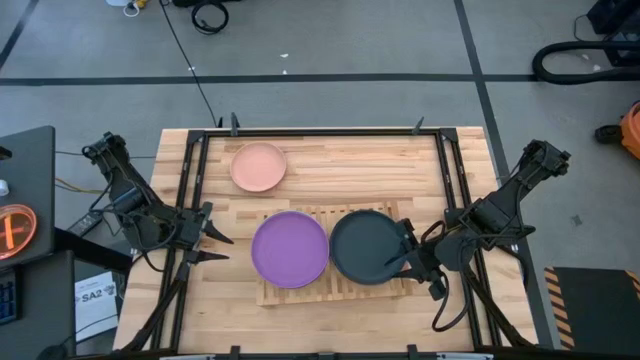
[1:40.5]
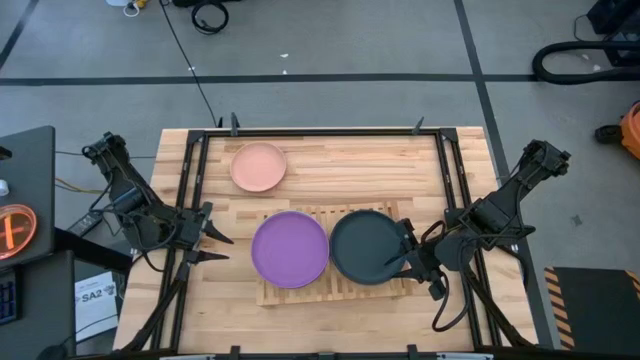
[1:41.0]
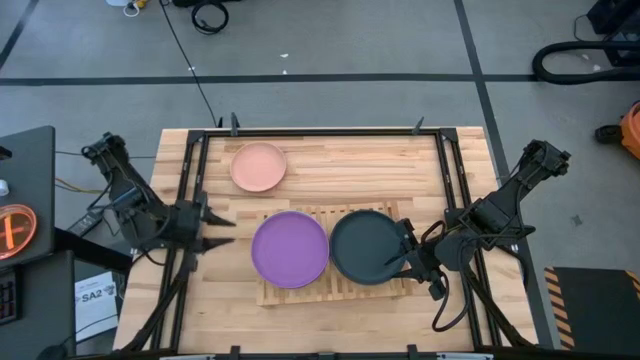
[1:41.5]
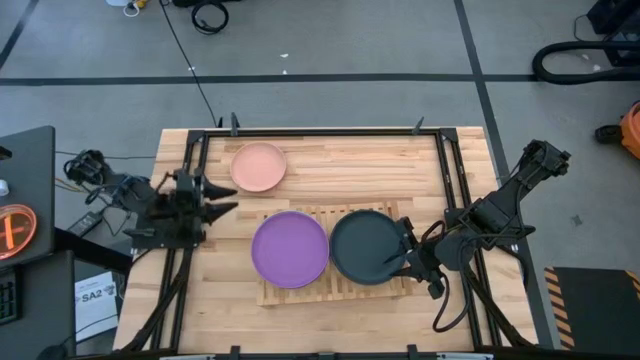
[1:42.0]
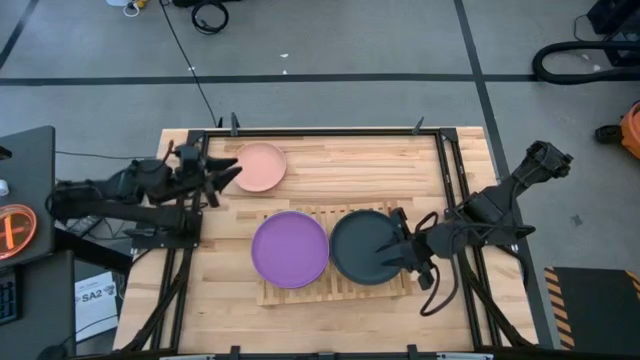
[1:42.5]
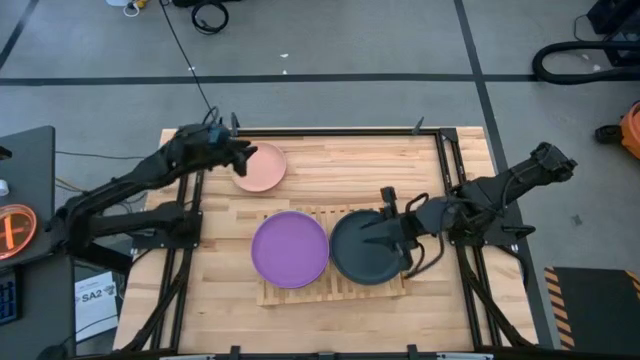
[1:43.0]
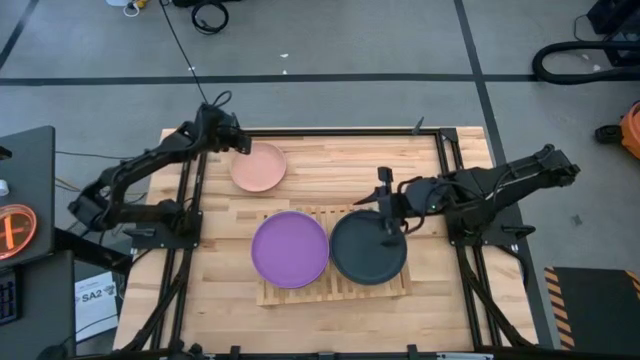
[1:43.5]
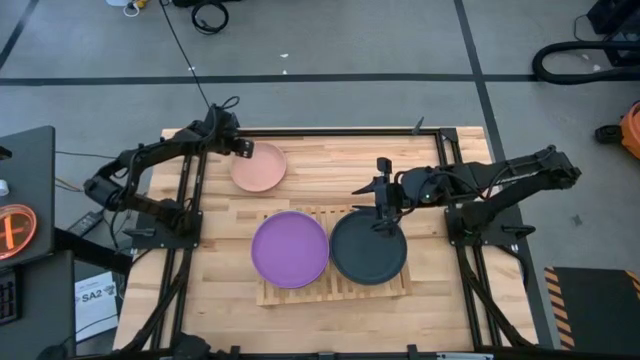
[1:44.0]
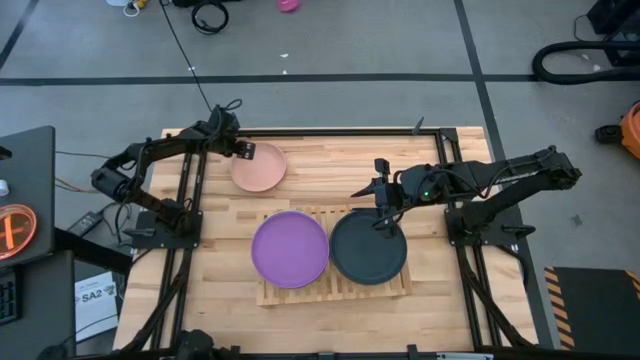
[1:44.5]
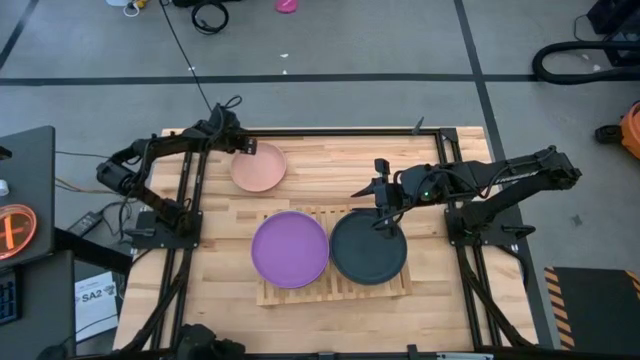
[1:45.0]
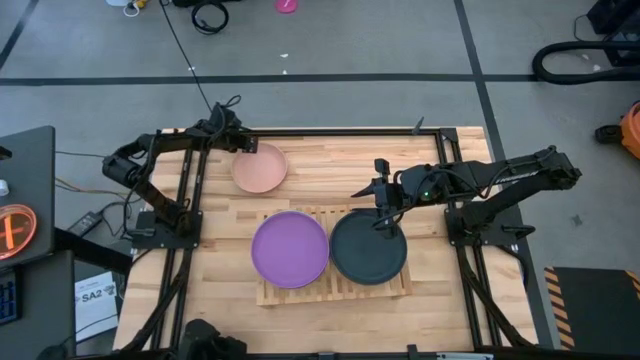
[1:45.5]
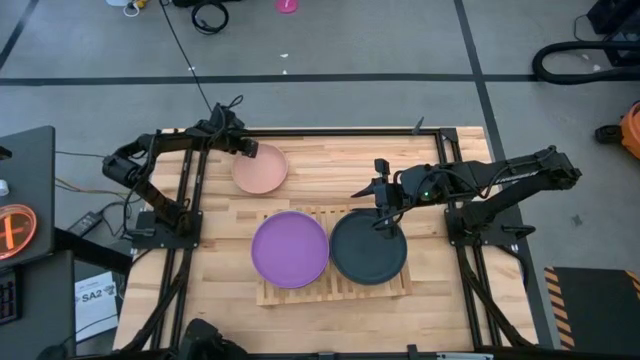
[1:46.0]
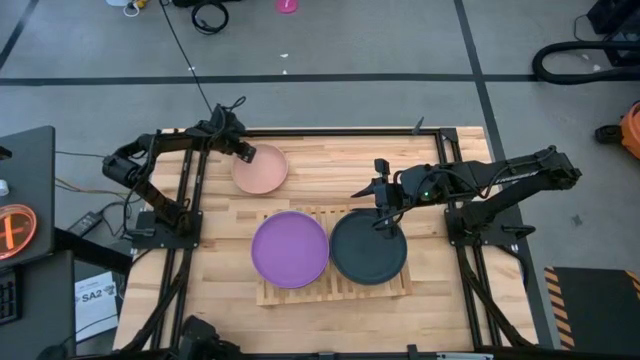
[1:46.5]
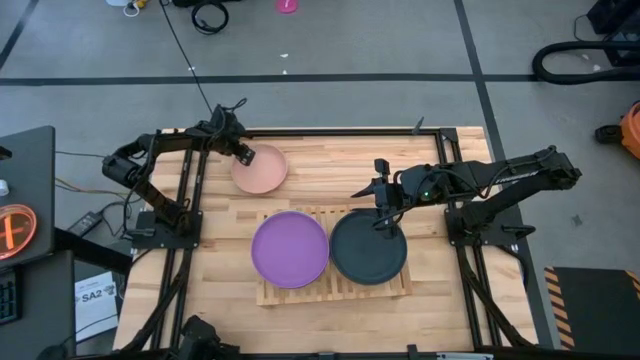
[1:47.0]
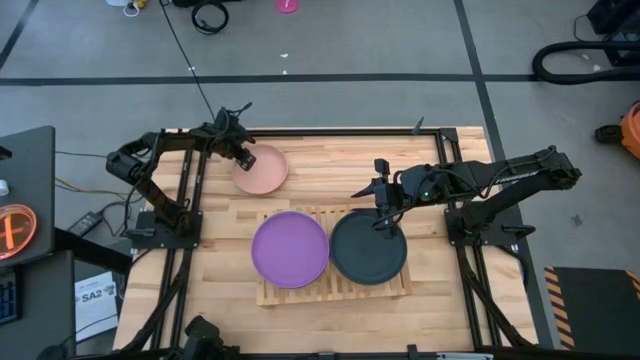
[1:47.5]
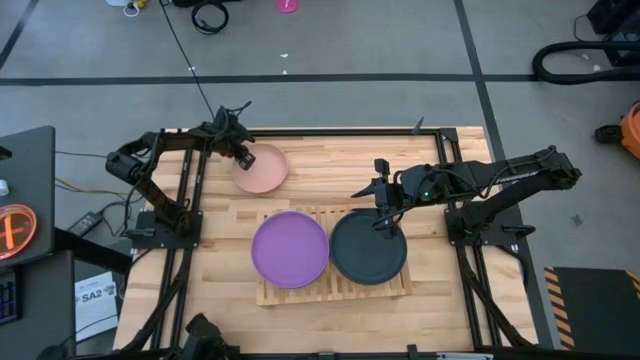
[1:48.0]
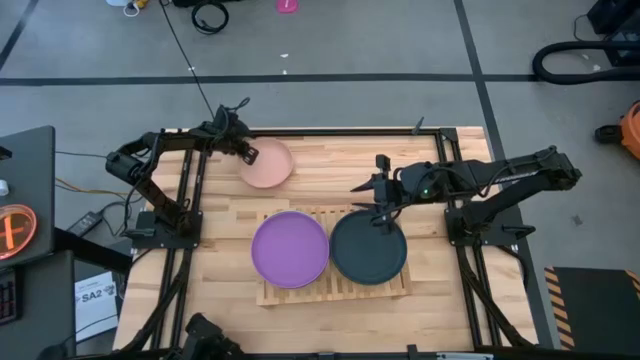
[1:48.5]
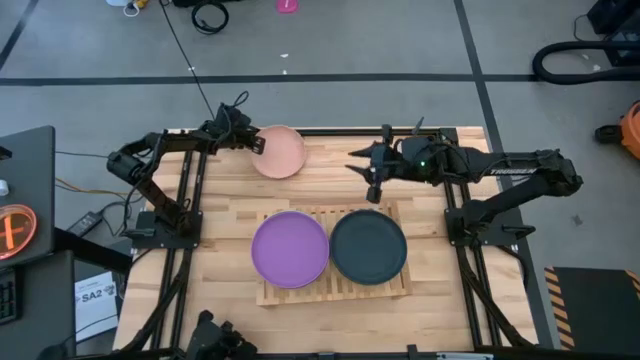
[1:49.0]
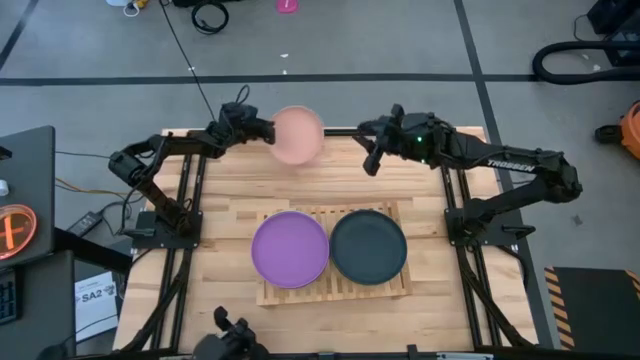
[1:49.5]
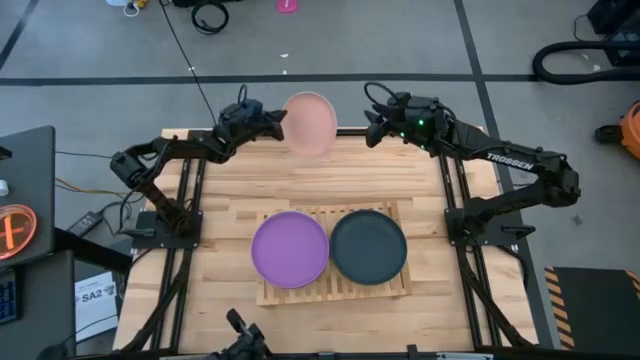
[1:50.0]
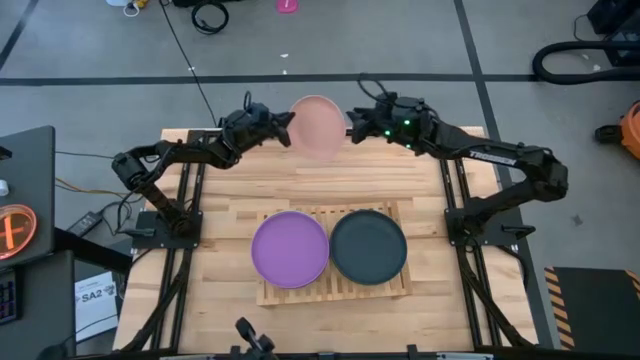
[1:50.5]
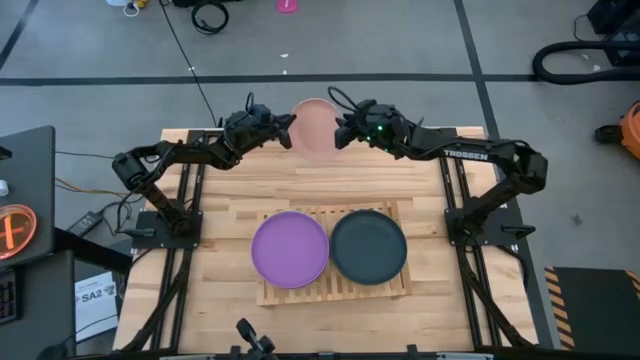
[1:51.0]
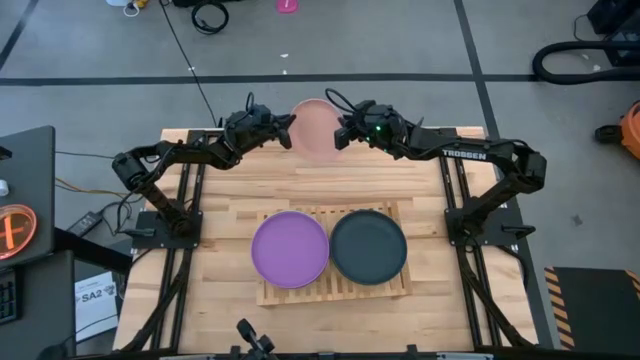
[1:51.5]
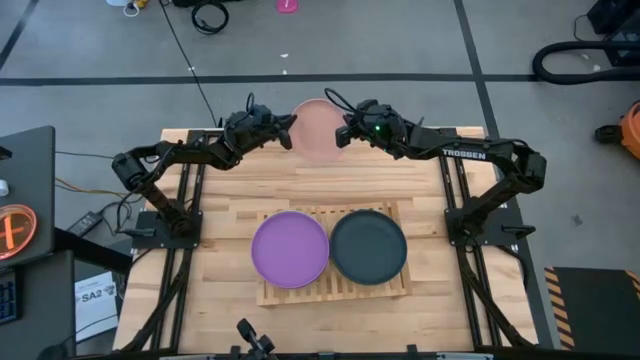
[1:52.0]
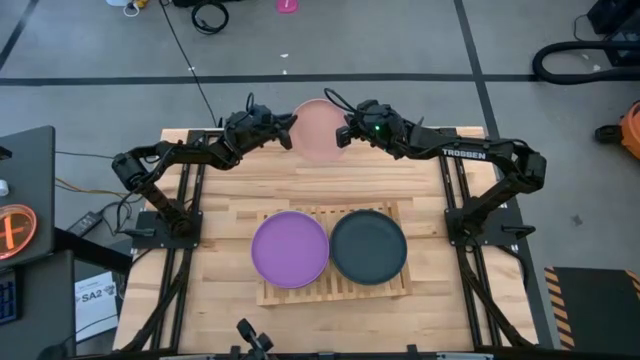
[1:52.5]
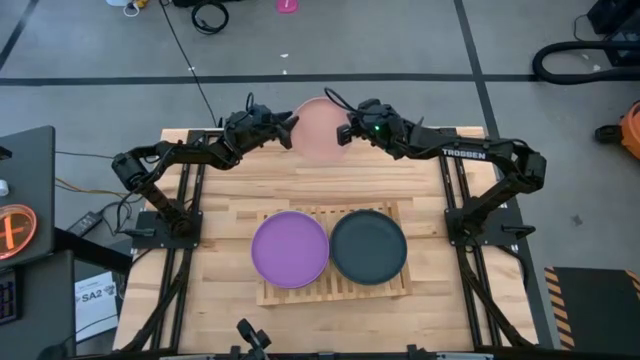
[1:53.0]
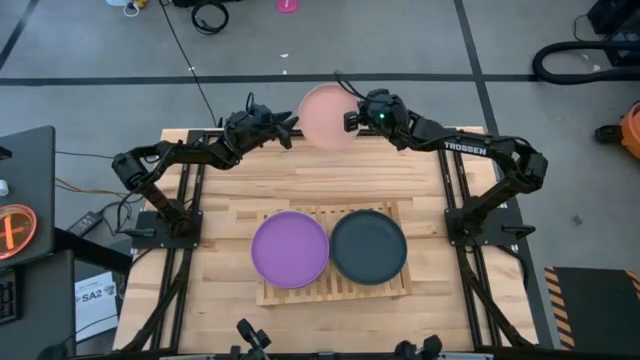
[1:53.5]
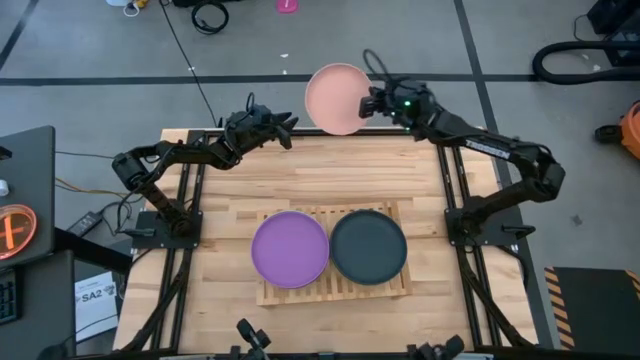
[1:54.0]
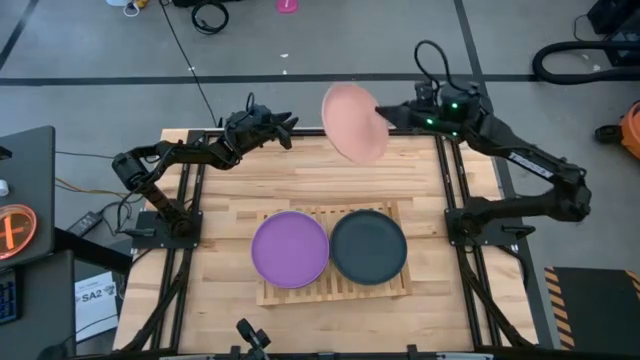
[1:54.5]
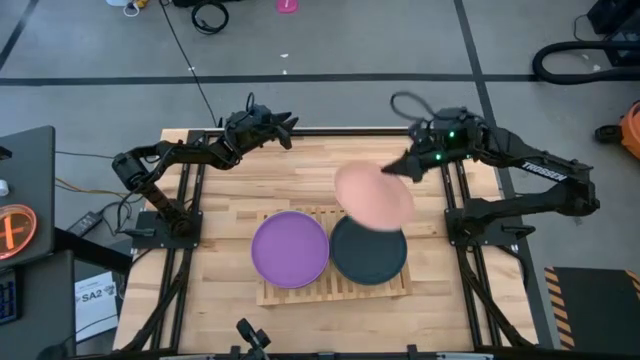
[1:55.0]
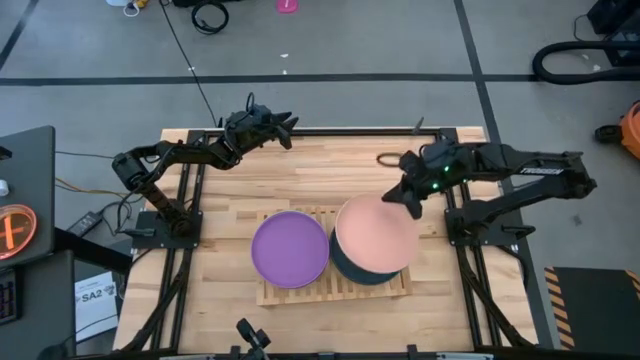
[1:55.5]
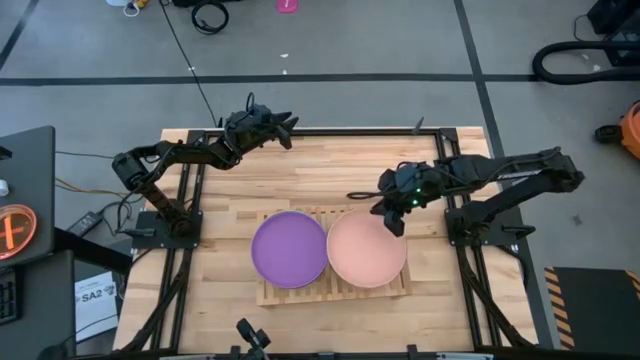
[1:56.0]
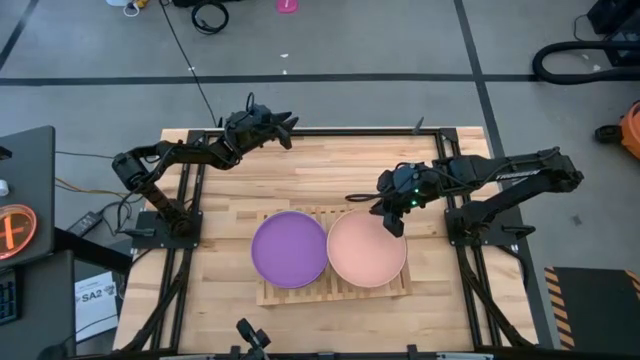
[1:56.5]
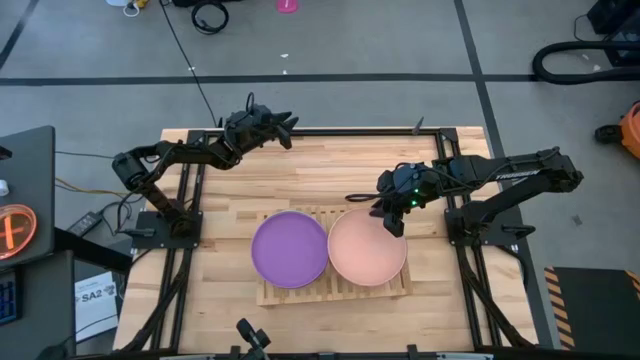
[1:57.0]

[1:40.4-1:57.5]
Task: Place and stack plates onto a shelf
Stack the light pink plate on top of the black plate on the shelf

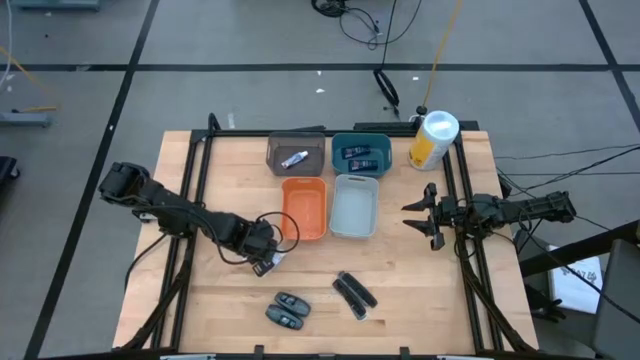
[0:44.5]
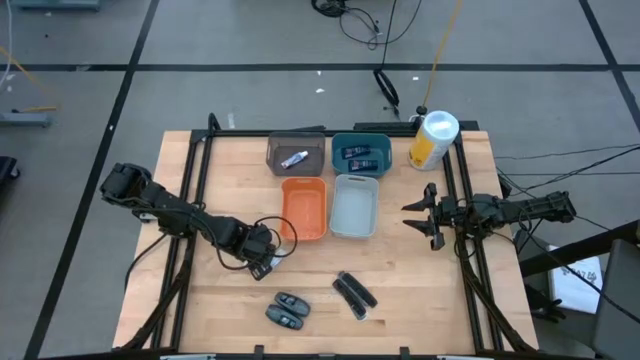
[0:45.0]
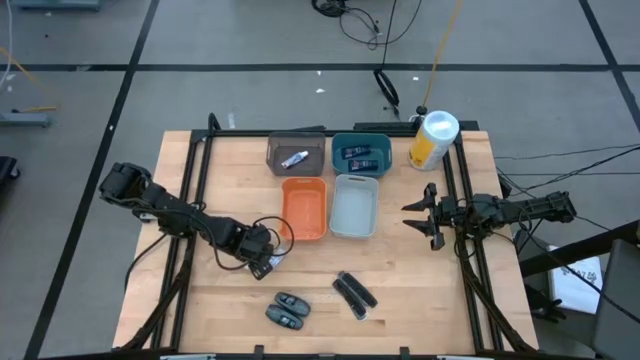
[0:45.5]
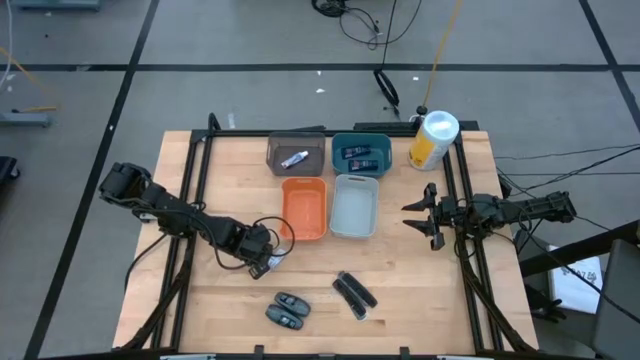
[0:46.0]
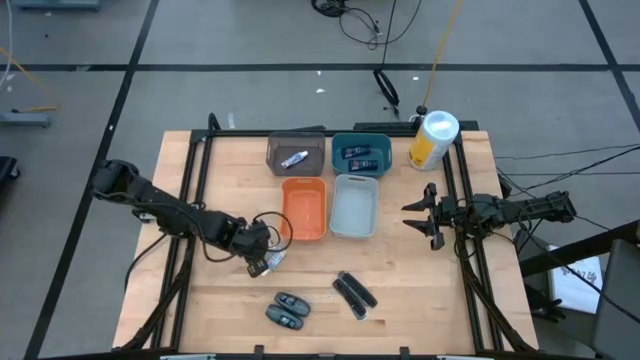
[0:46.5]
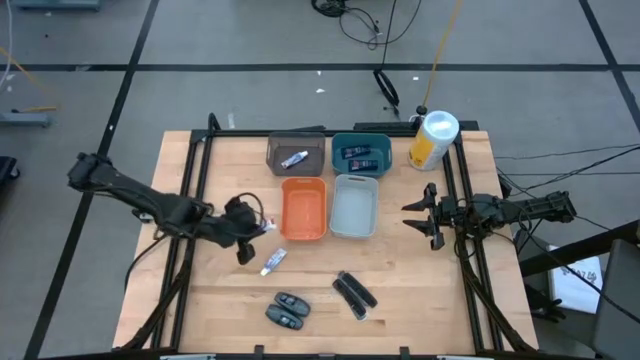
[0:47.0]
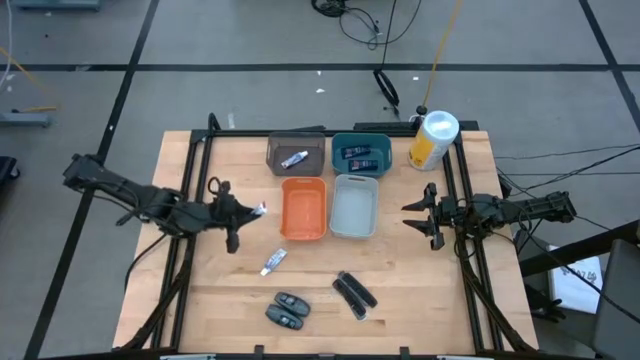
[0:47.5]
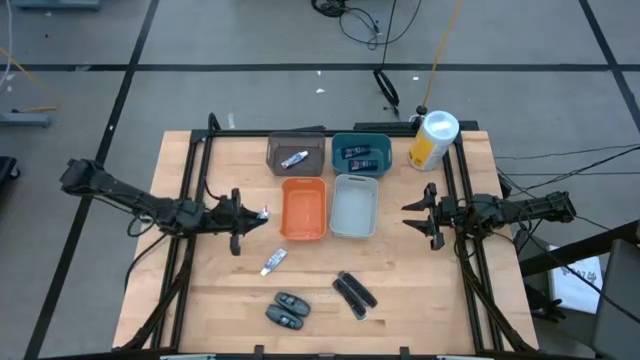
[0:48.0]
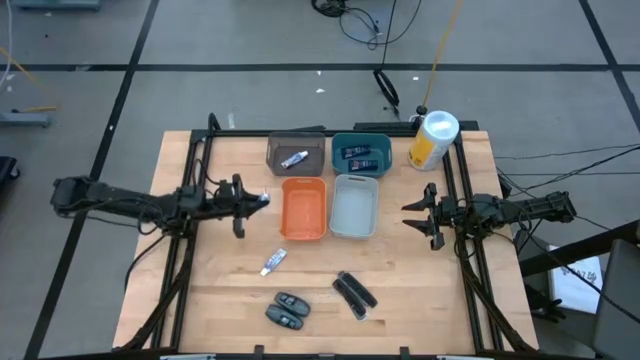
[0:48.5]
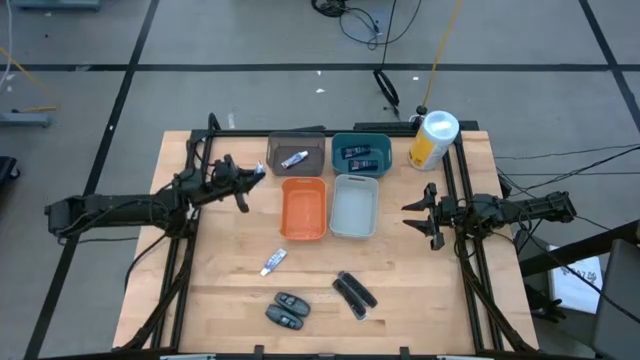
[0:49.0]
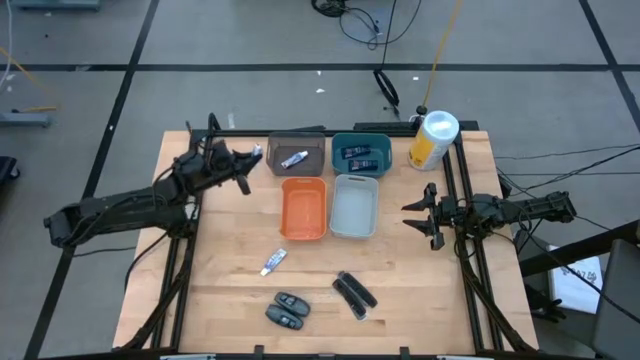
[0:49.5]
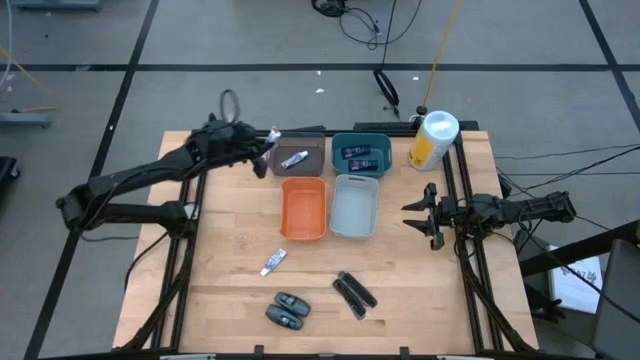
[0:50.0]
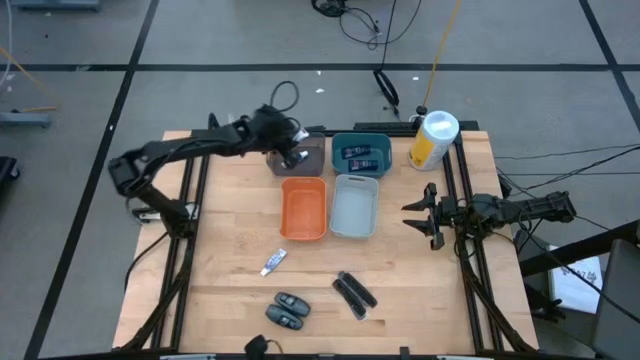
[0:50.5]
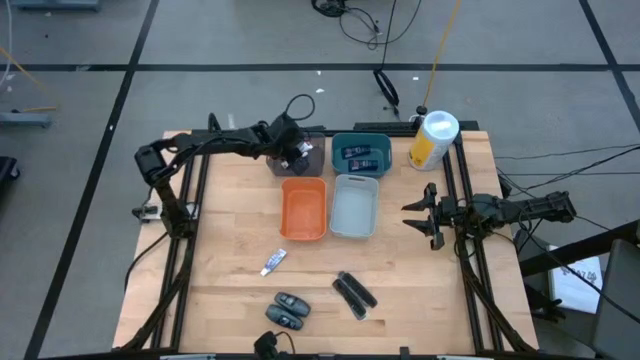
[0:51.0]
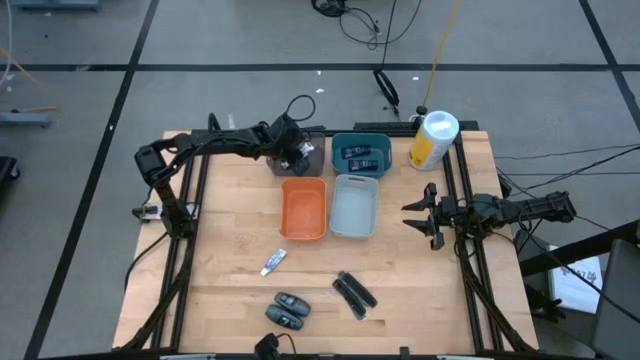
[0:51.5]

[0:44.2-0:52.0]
Task: Pick & Place Travel size toiletries
Put the left white toothpaste into the black transparent bin
